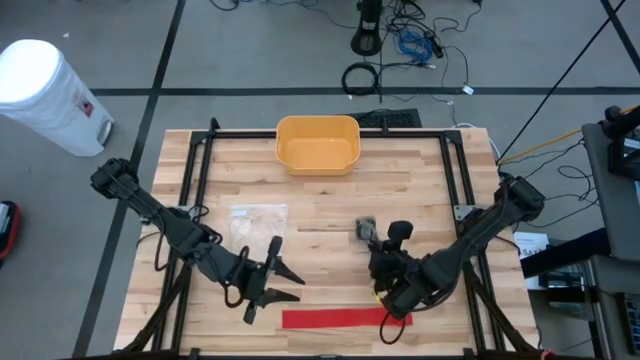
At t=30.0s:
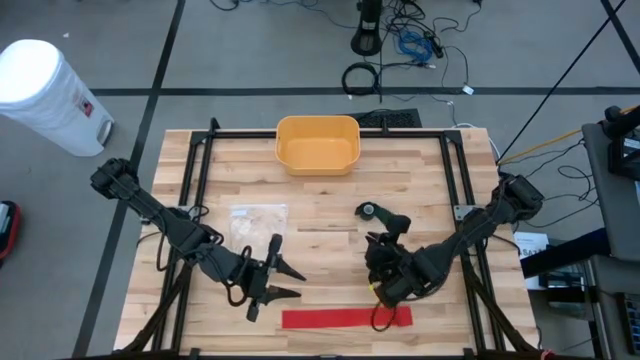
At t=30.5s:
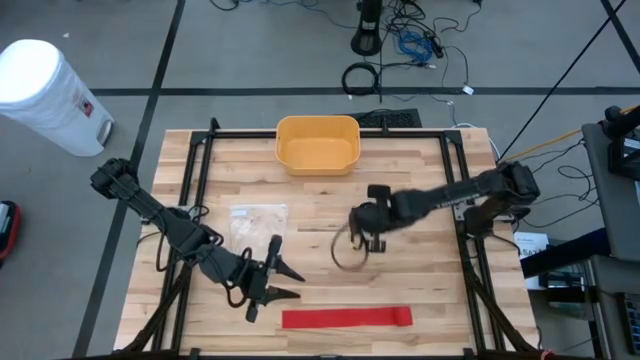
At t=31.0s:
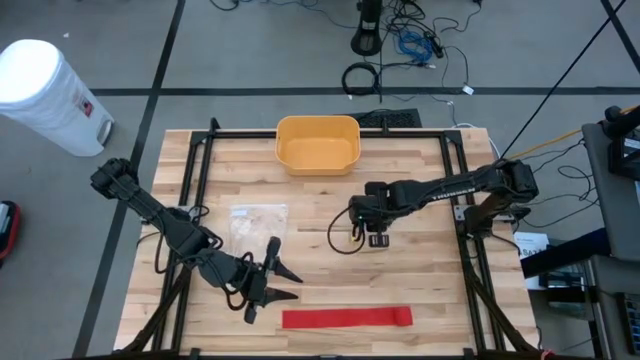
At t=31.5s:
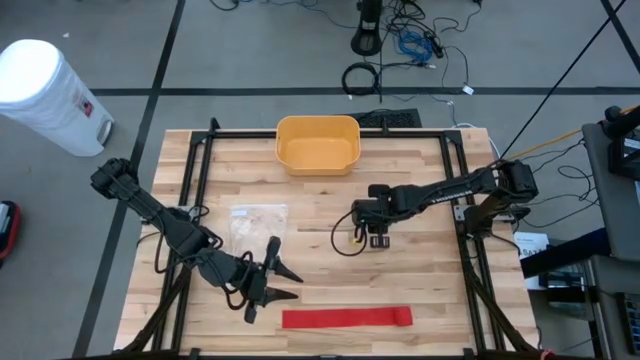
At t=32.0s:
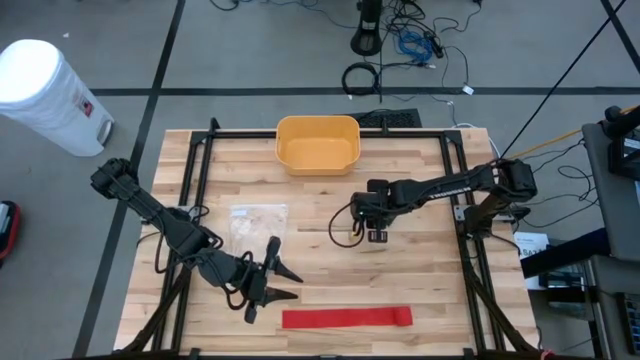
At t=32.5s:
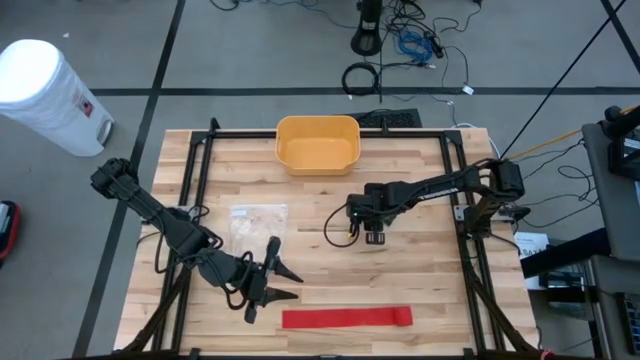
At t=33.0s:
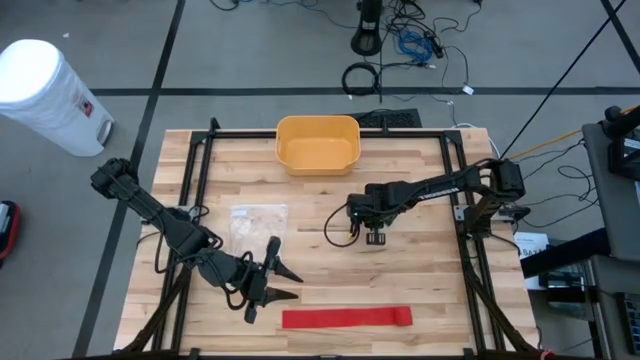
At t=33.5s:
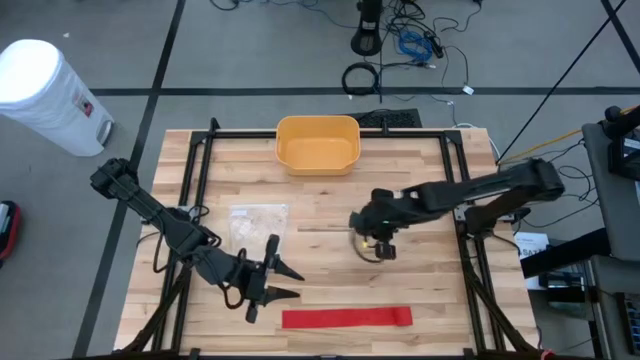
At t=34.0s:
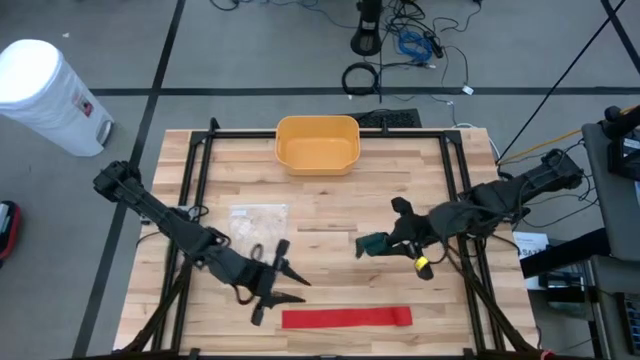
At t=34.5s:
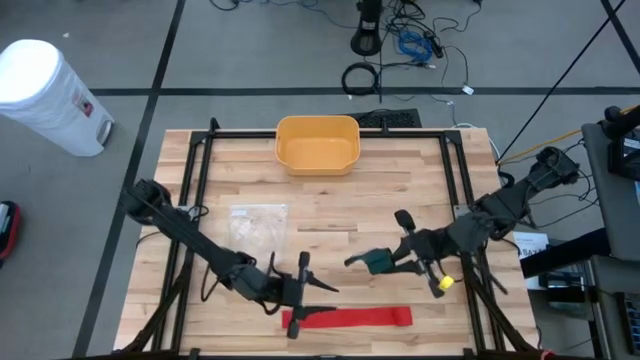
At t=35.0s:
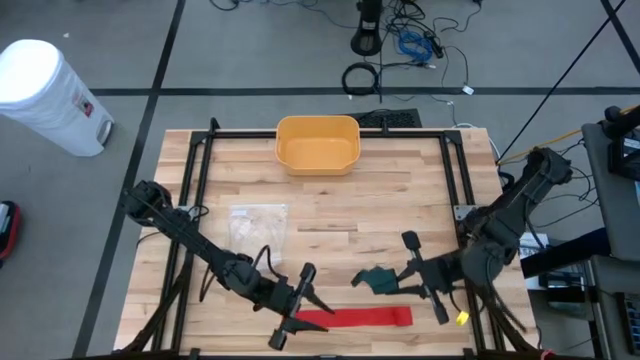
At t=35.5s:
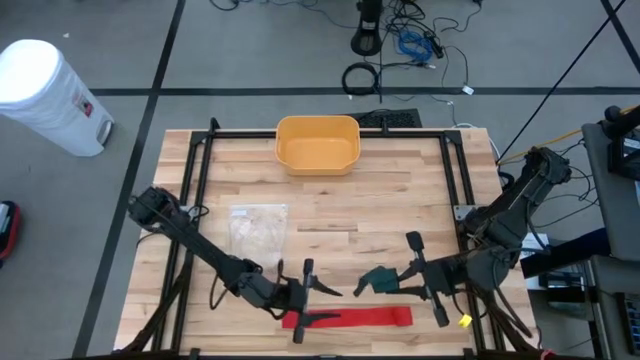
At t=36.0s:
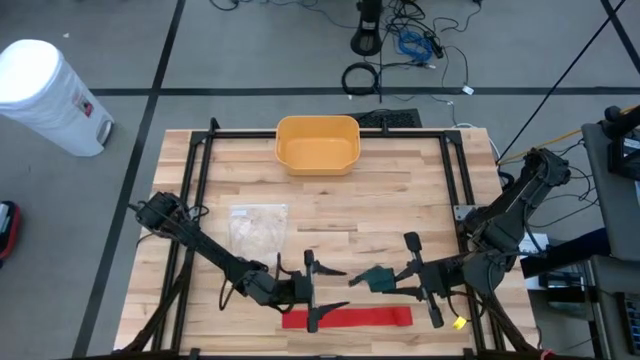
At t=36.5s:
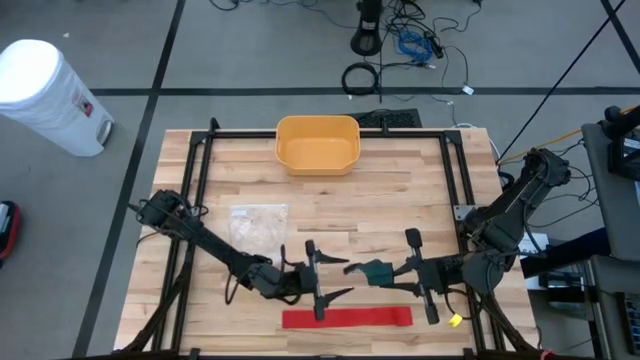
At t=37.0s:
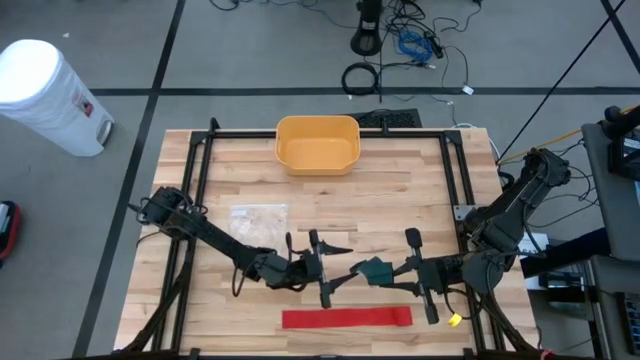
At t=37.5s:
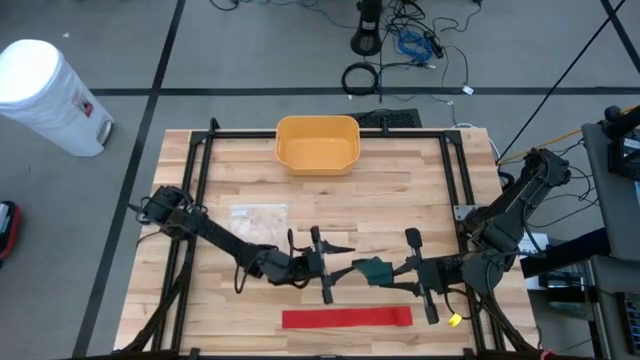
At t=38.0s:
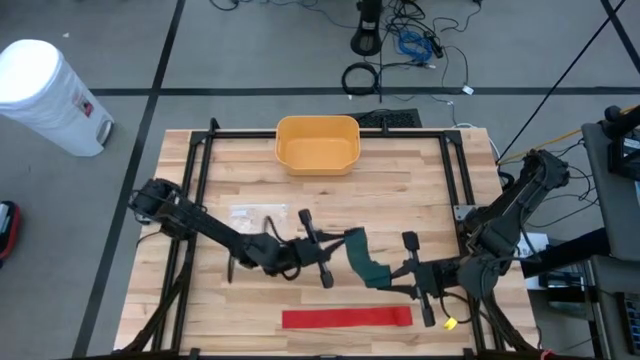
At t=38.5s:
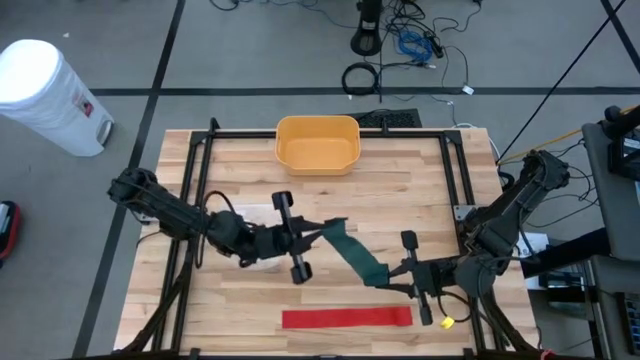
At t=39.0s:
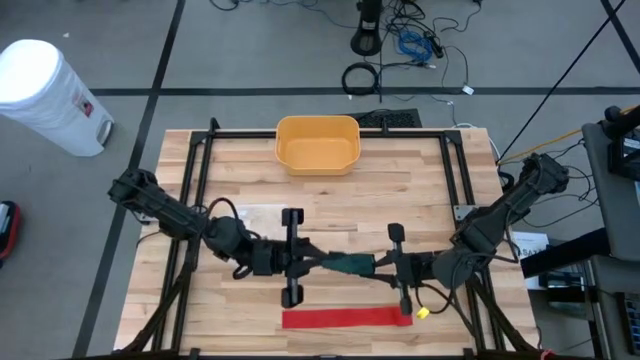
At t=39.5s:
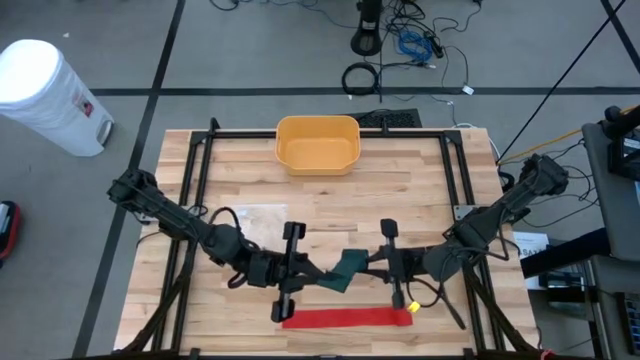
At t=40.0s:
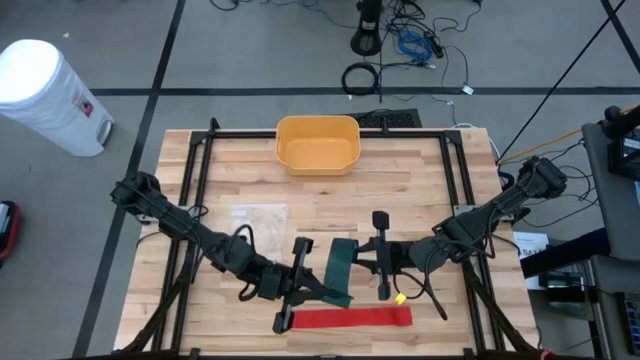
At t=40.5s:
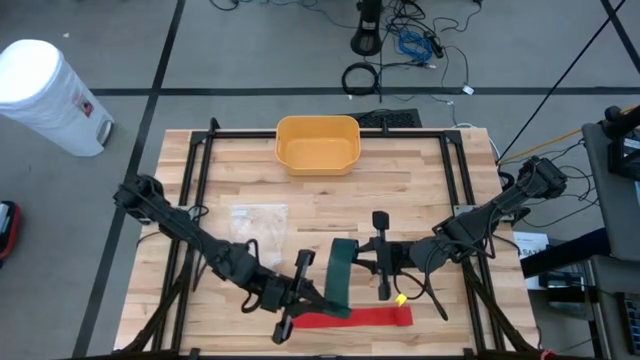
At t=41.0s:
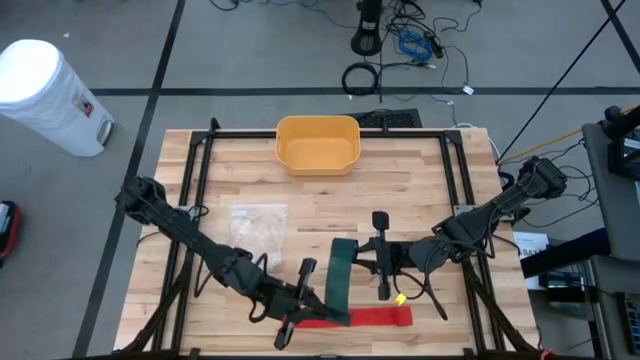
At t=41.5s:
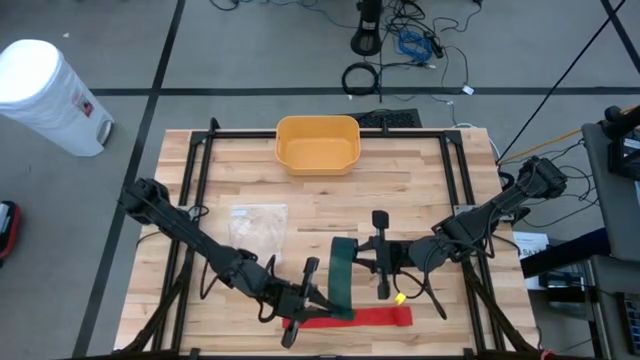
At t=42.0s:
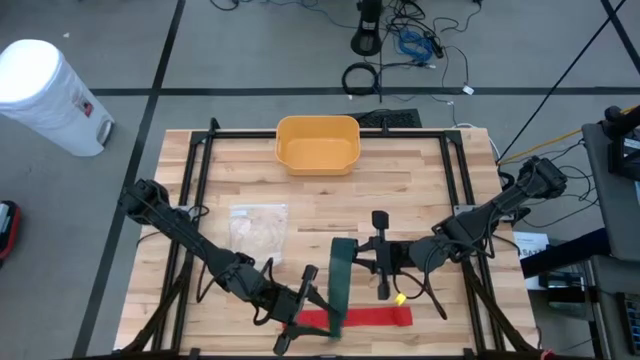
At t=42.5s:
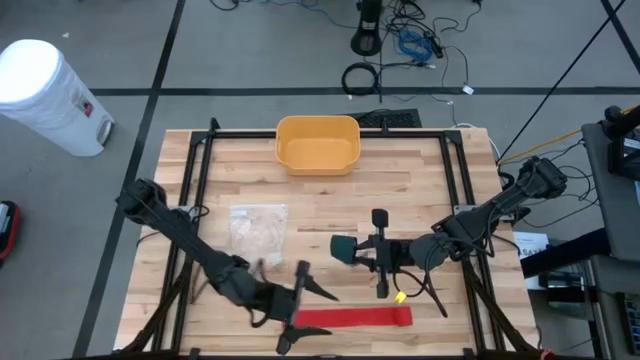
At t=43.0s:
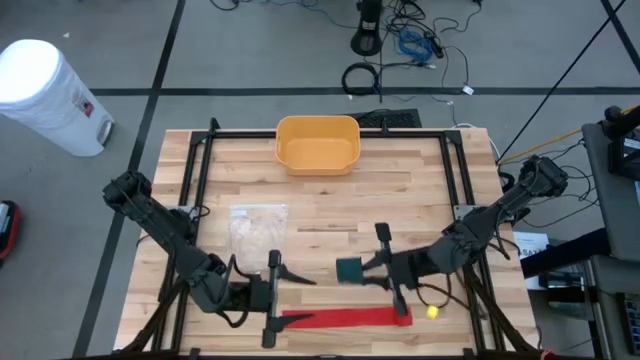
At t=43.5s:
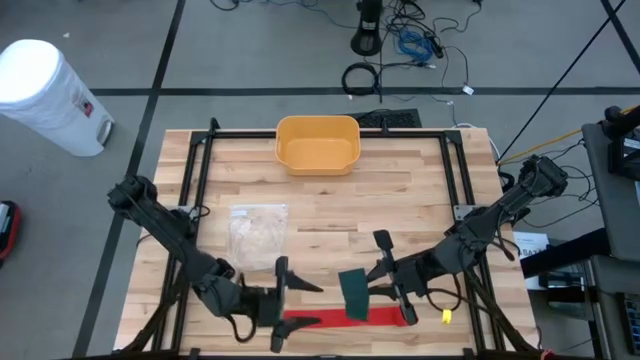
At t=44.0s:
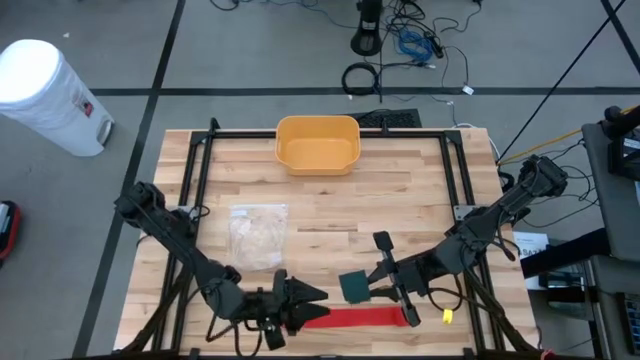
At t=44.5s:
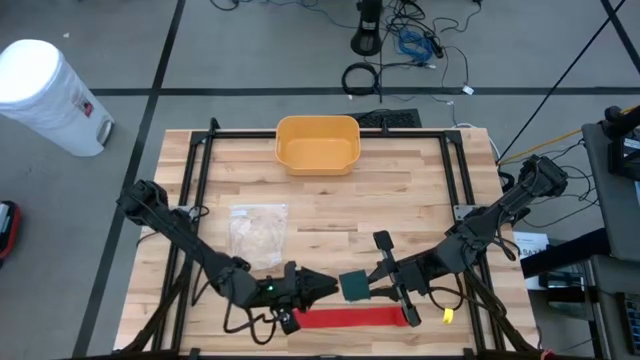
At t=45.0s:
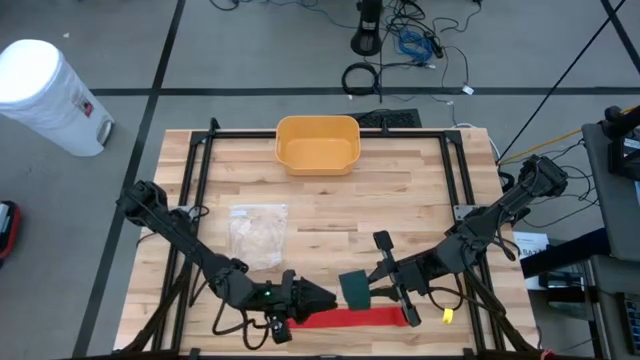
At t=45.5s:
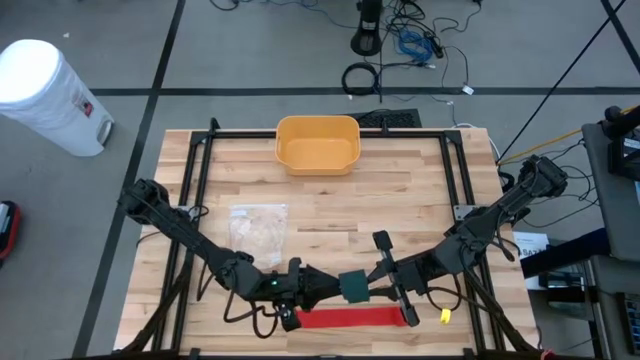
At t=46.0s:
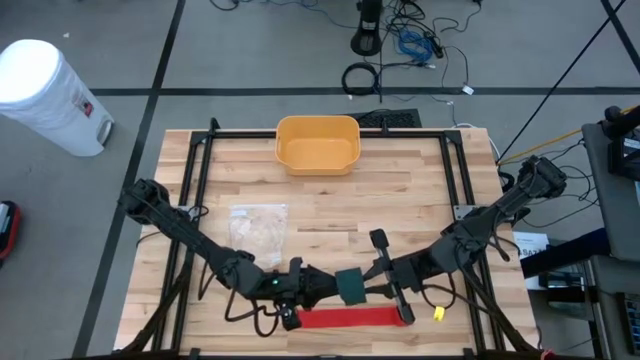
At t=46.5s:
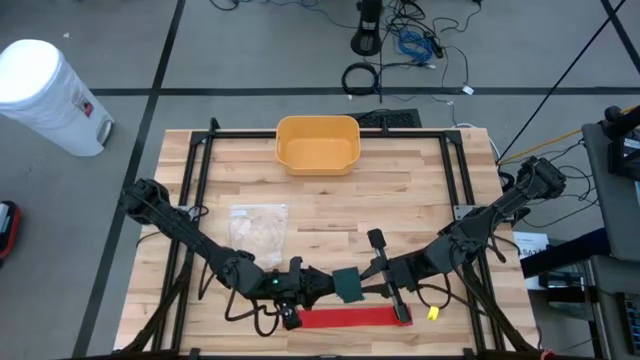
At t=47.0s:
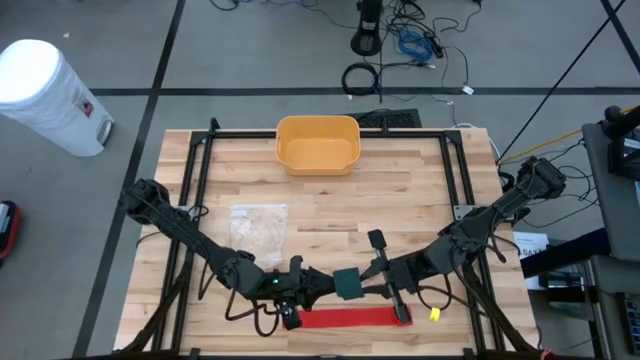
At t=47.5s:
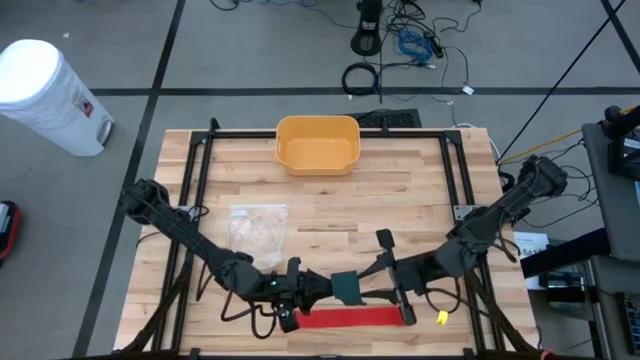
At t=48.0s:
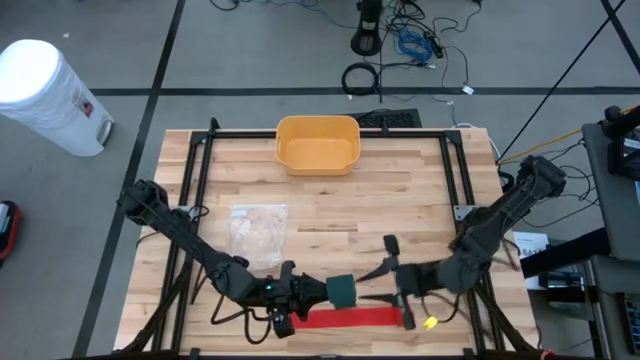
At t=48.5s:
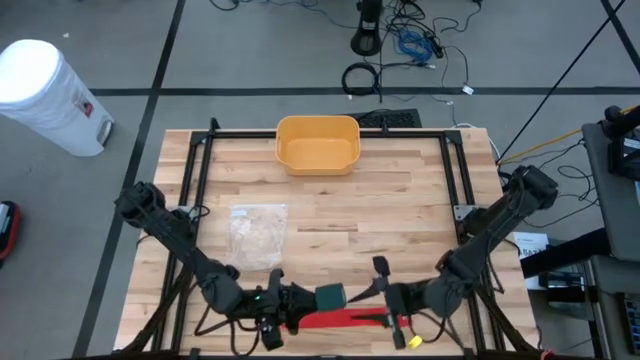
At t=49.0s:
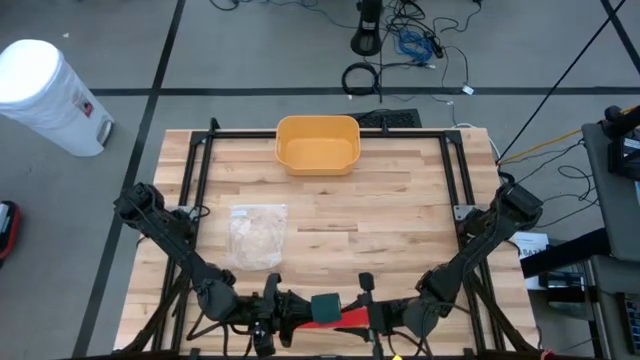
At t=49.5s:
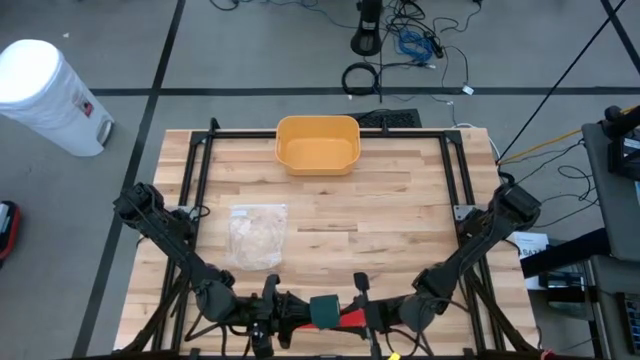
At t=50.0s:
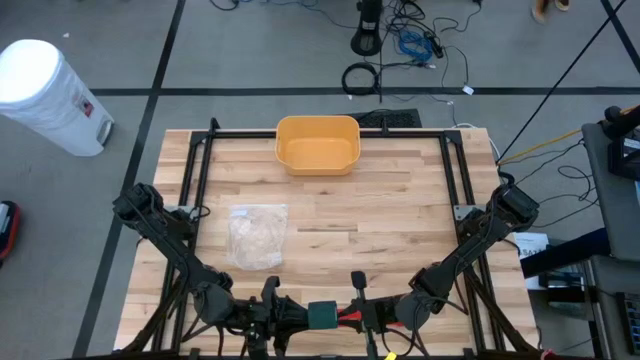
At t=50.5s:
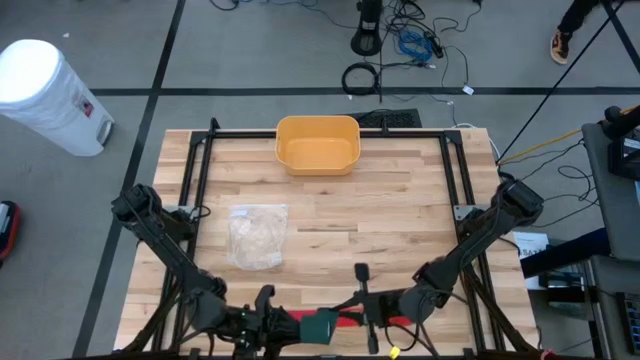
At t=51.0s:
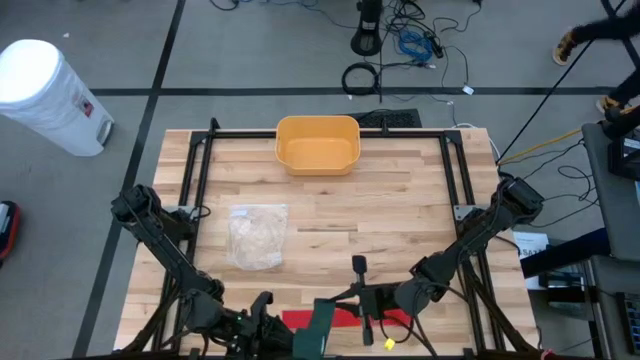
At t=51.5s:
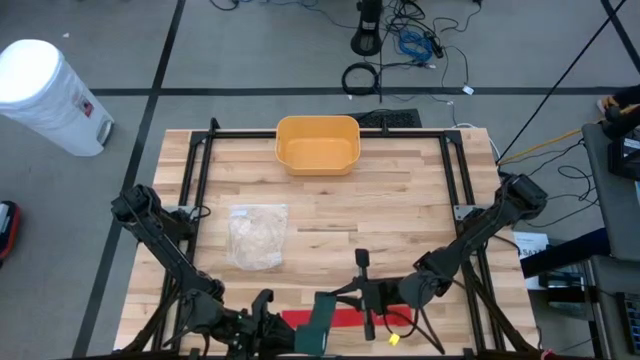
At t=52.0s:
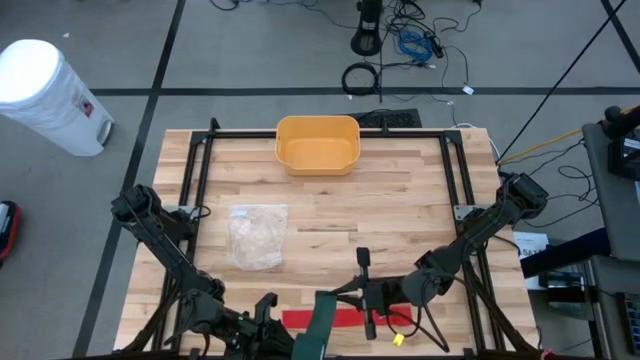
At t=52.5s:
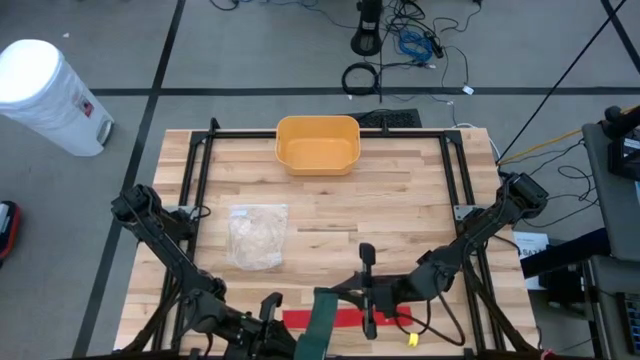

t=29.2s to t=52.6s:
Task: Roll bandage
Roll the green bandage
